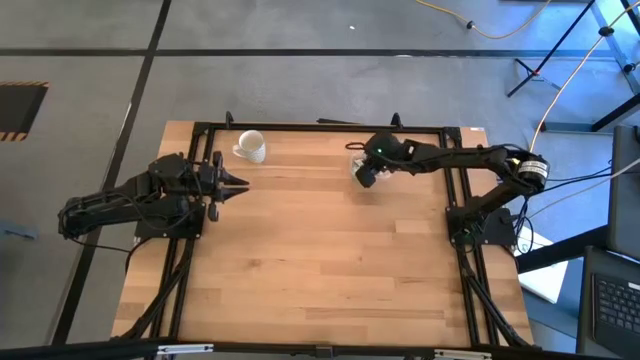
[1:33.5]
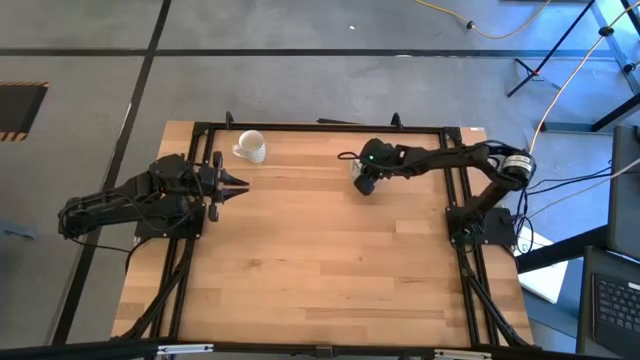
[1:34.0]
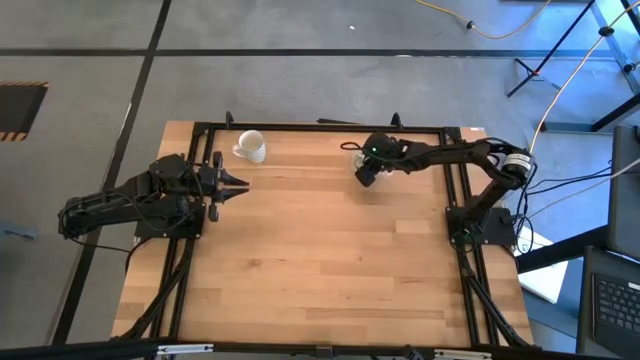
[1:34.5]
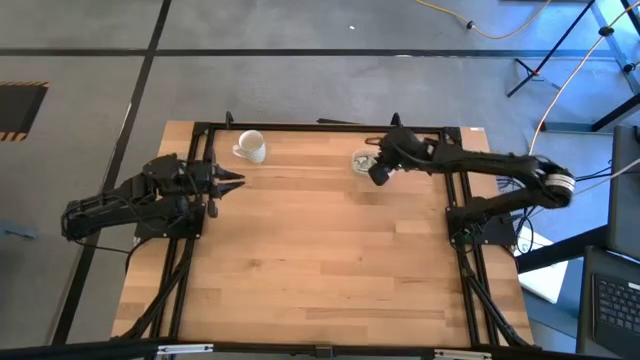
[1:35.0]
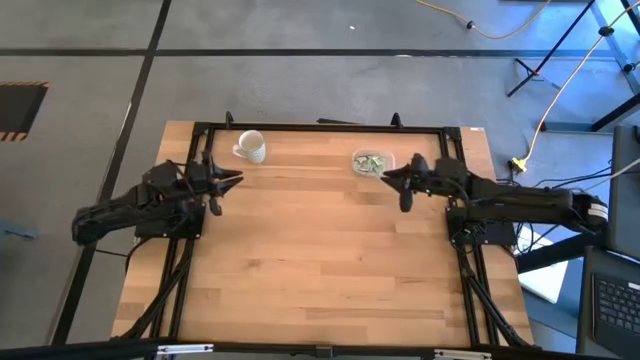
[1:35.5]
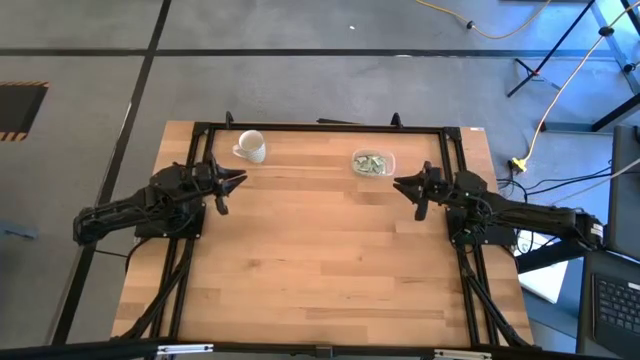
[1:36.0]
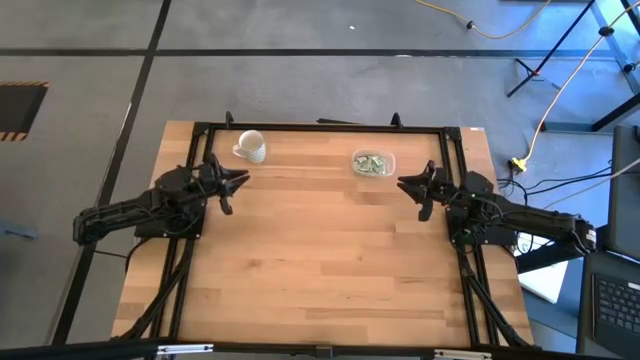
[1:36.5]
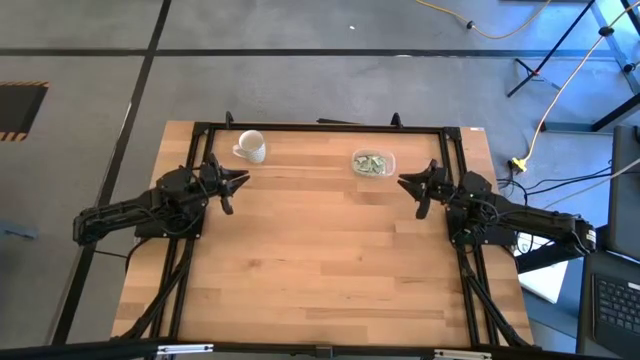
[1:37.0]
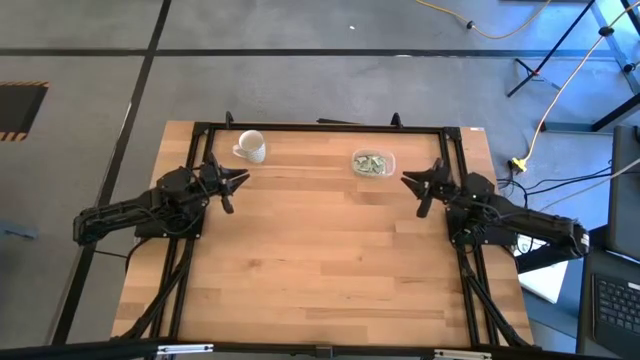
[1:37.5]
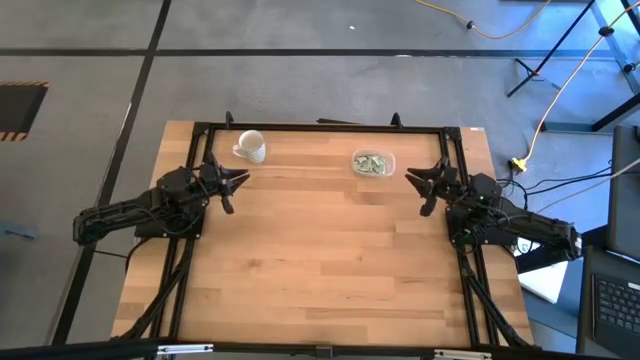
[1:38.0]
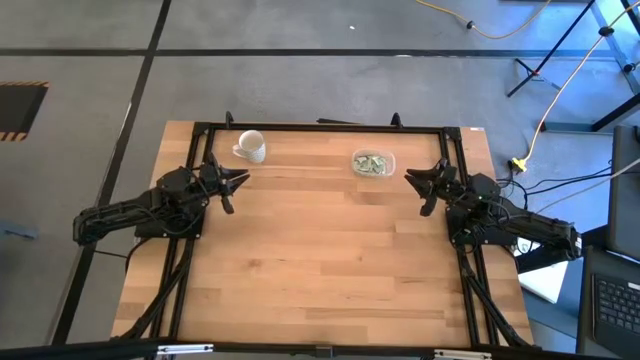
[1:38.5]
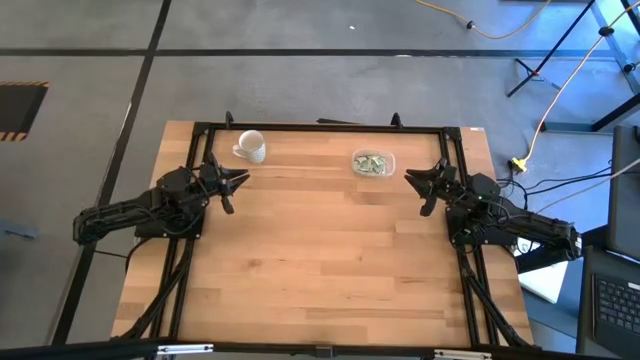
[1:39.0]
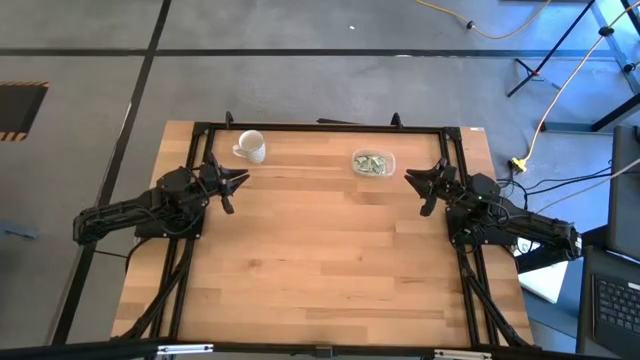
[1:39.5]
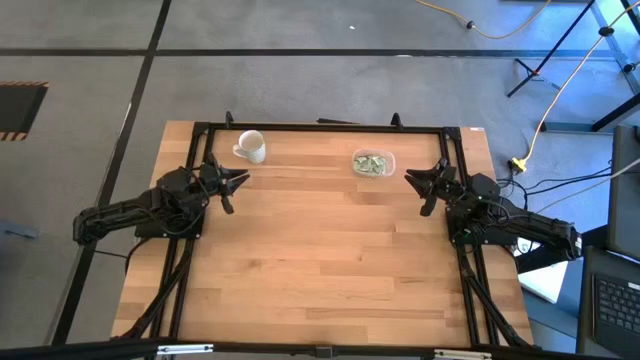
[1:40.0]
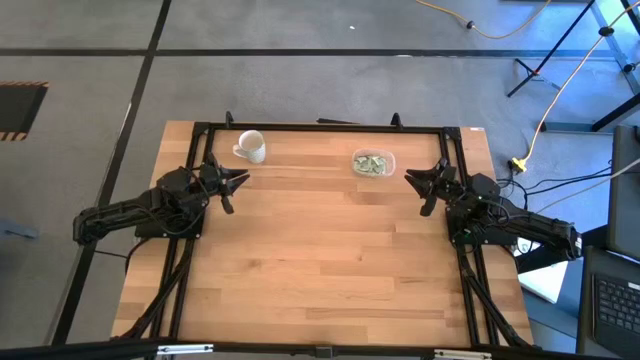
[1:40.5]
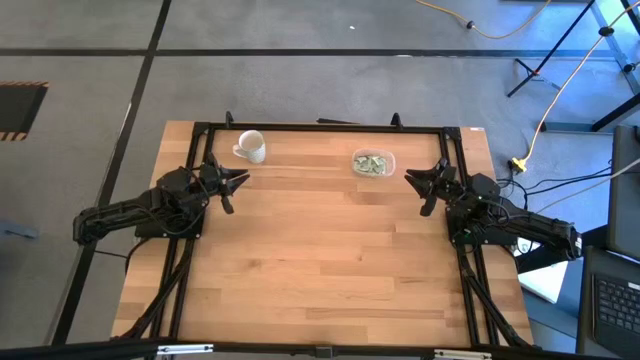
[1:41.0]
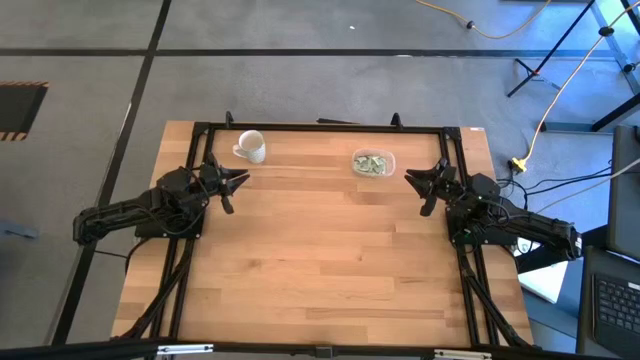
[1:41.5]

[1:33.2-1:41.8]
Task: Pick and place items into bin
Return to Home Position

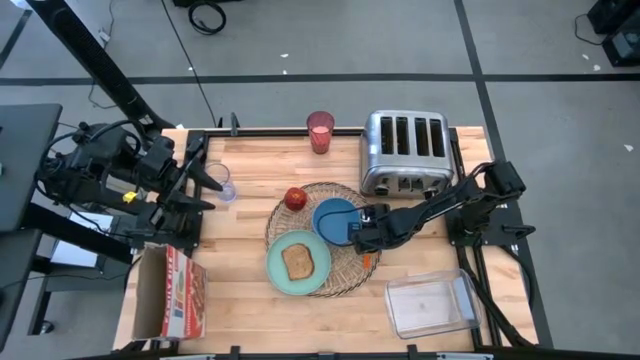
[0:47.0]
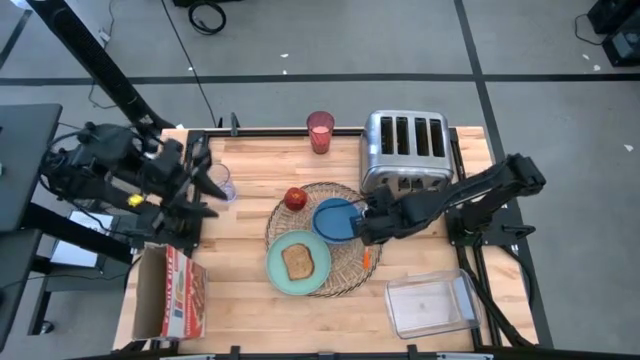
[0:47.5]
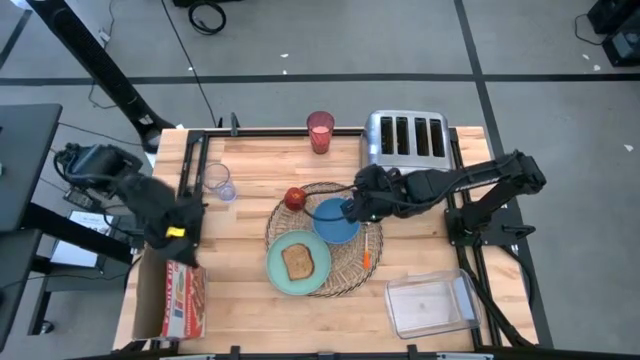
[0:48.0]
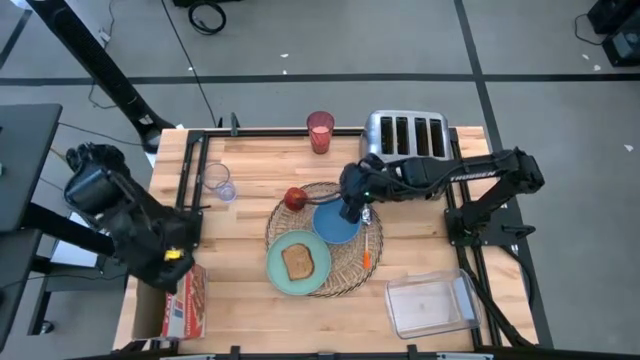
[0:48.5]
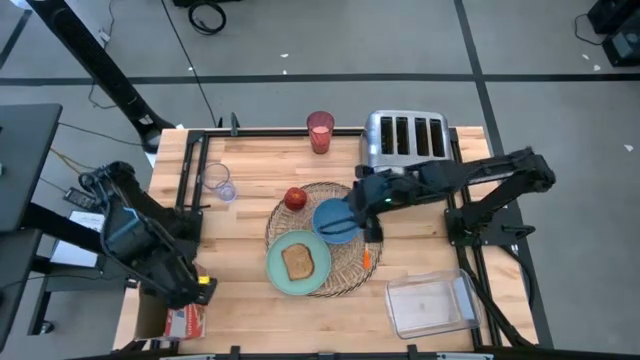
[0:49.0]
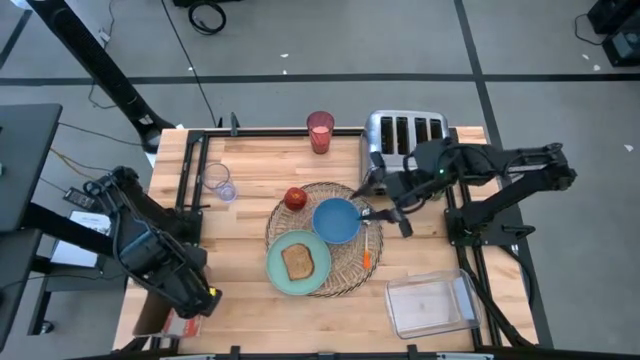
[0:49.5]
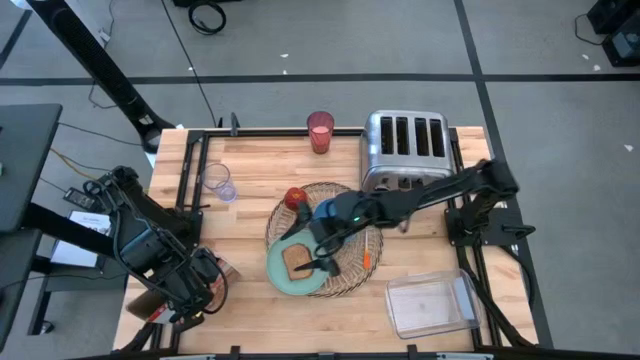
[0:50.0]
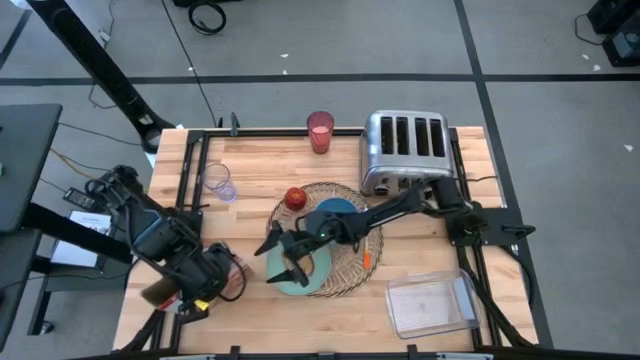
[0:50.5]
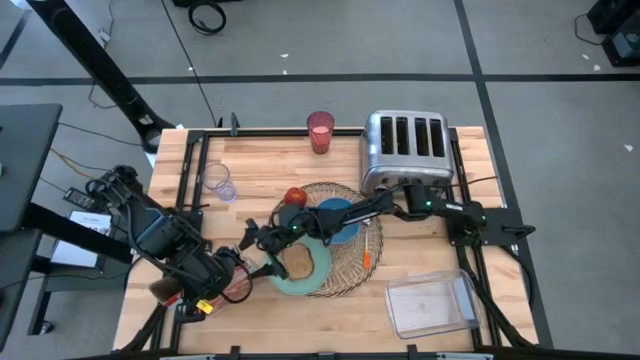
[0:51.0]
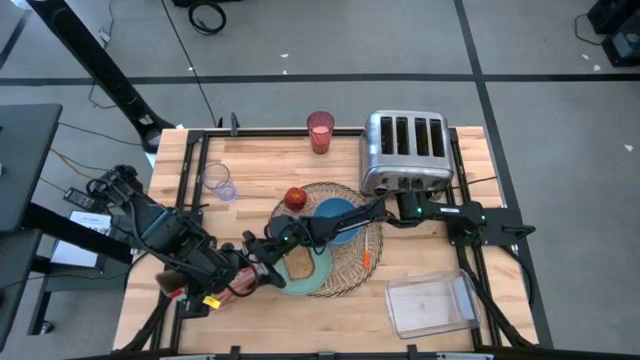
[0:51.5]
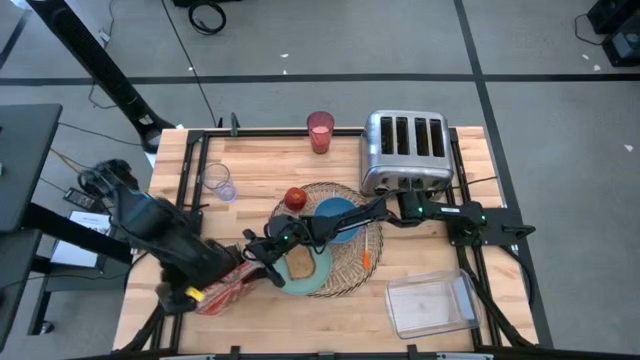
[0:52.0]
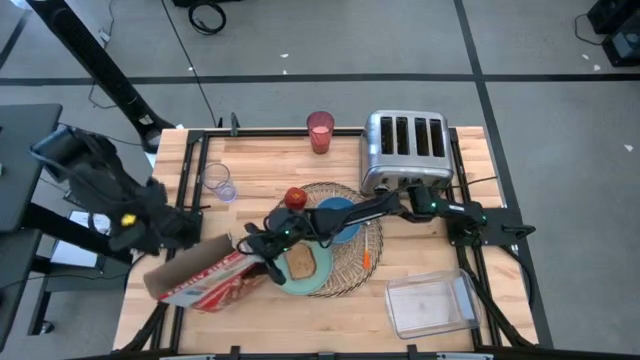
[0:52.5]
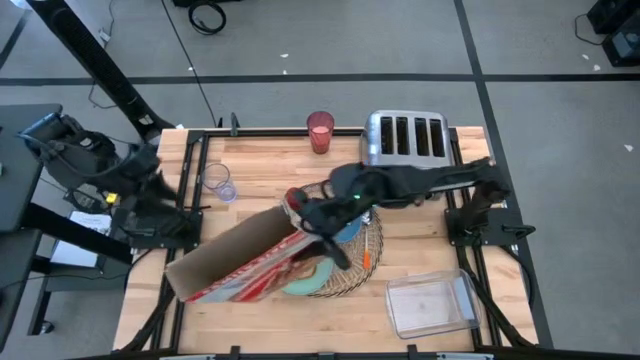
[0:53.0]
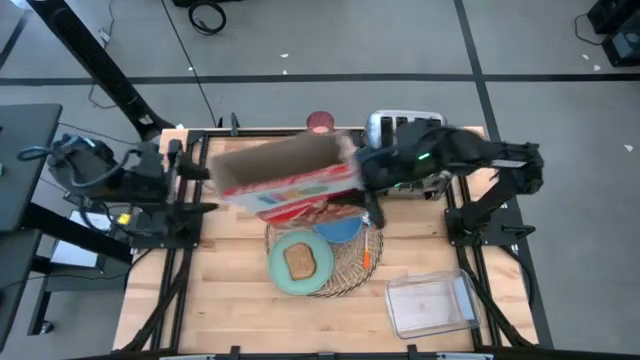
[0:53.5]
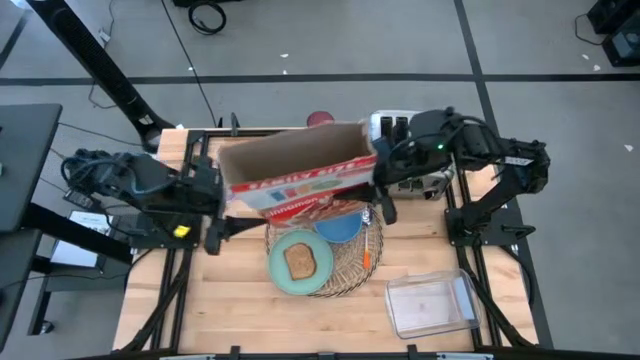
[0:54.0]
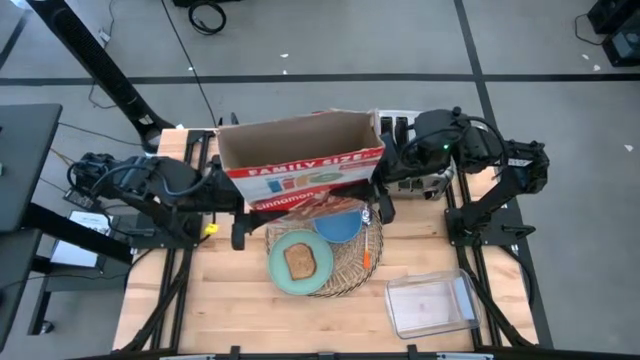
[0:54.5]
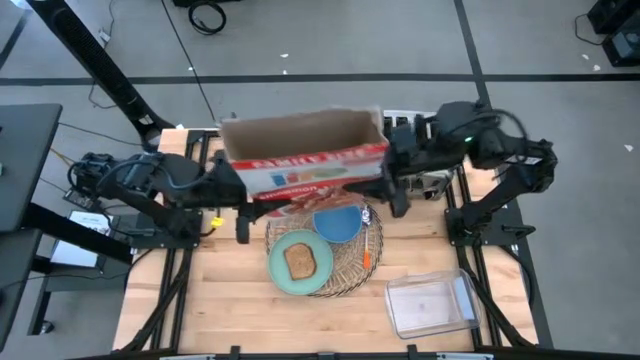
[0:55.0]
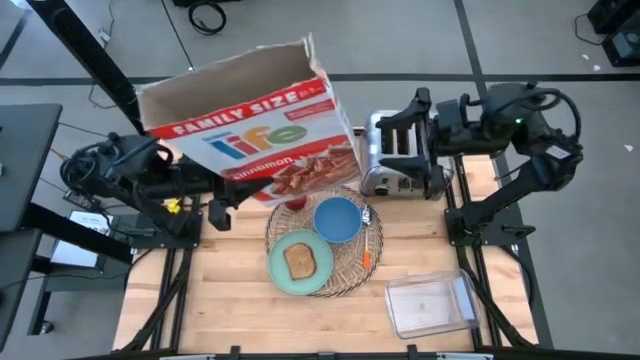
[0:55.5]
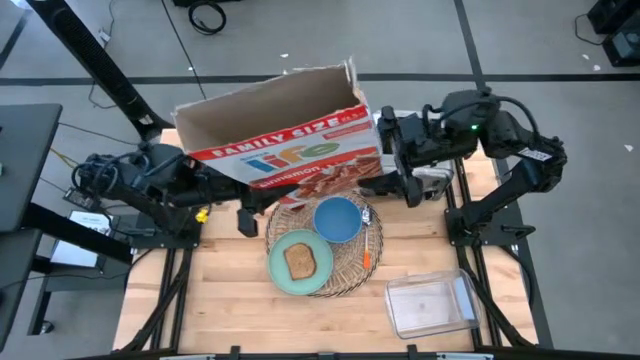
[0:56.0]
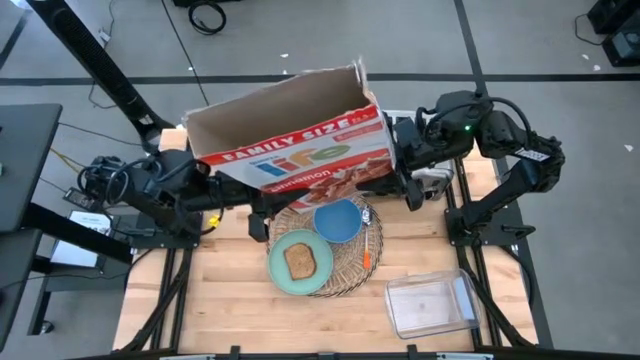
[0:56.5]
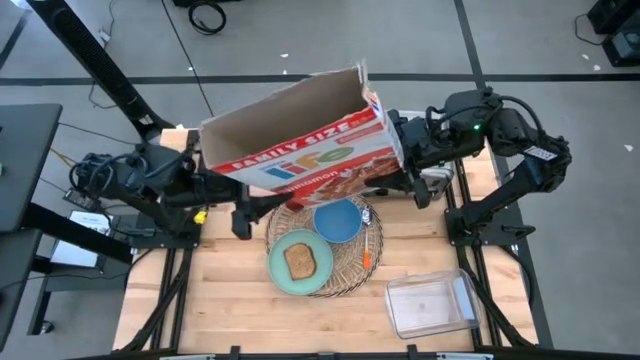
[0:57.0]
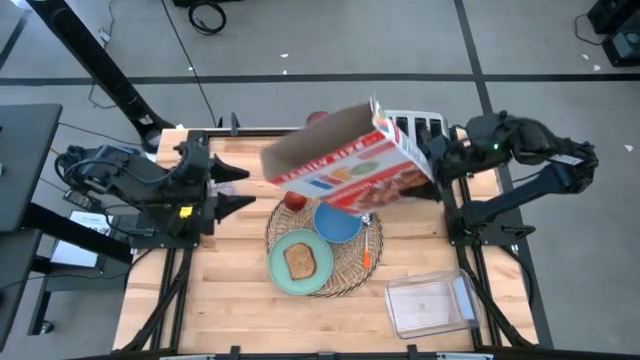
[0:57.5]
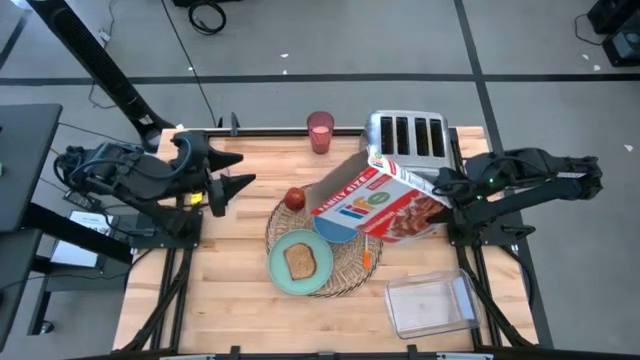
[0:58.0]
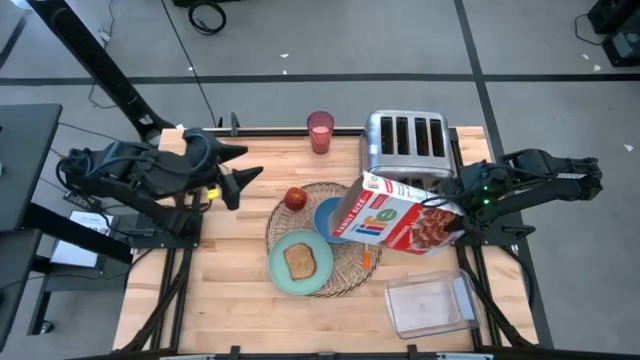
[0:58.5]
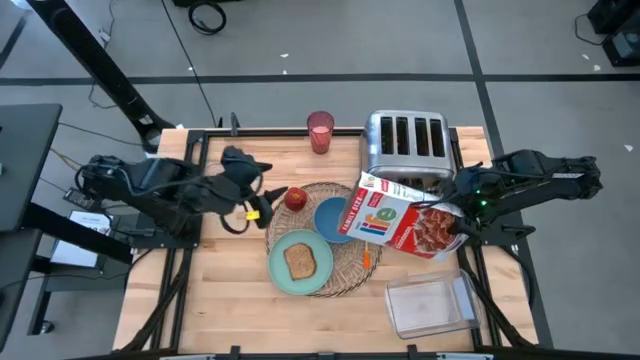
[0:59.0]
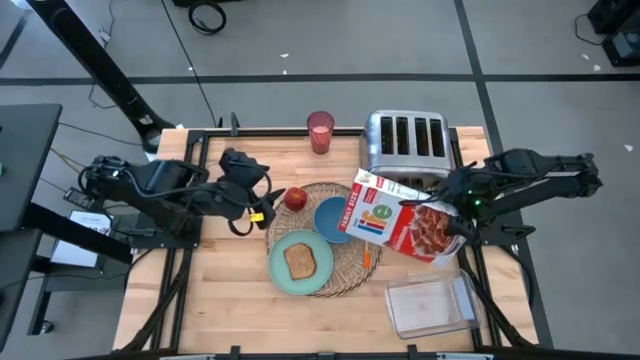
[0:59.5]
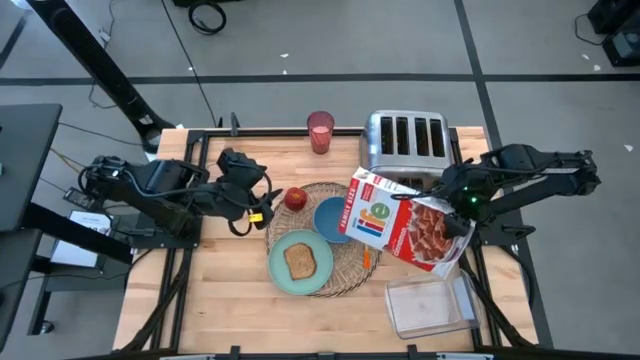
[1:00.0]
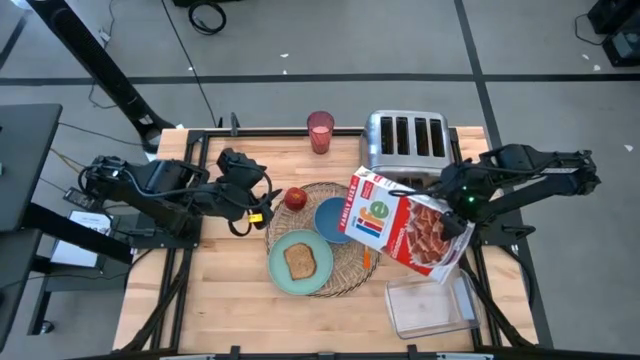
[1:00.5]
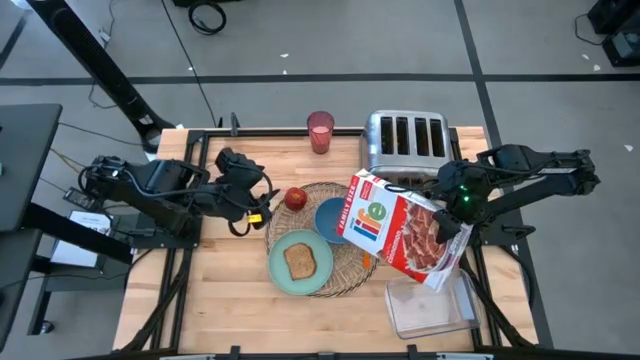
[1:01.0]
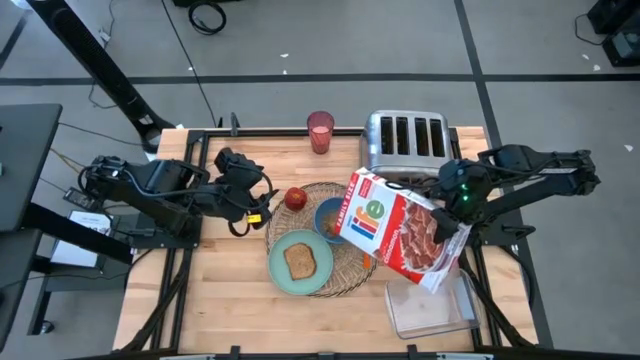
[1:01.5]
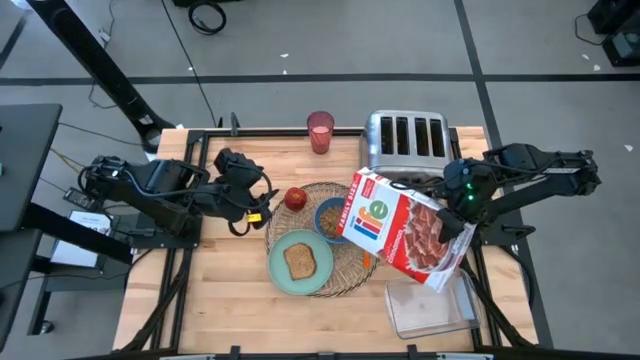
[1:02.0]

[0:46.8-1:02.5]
Task: Arrange a breakfast setting
Pour the cereal from the cereal box into the blue bowl
